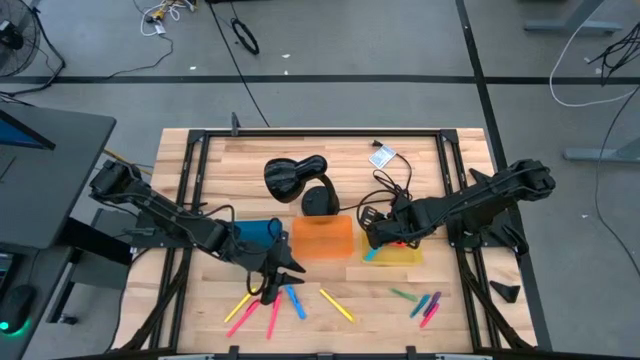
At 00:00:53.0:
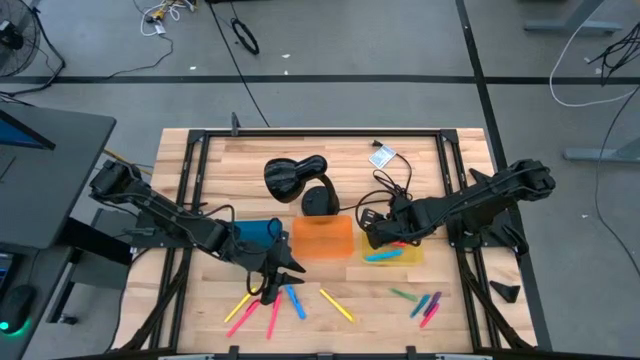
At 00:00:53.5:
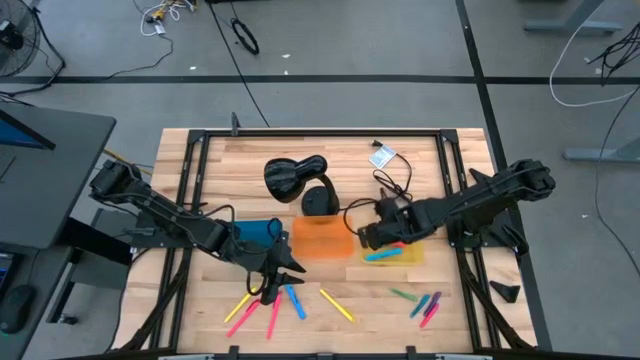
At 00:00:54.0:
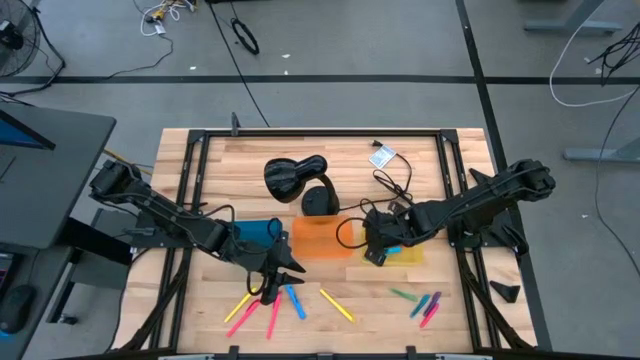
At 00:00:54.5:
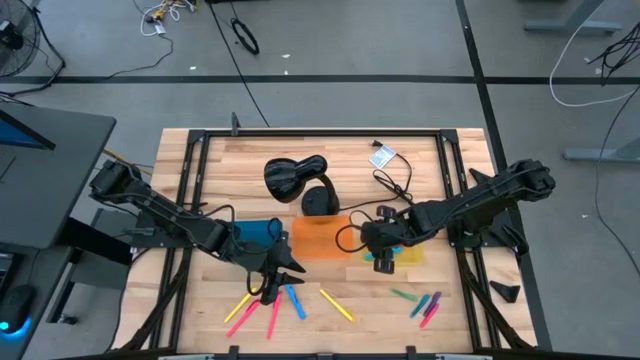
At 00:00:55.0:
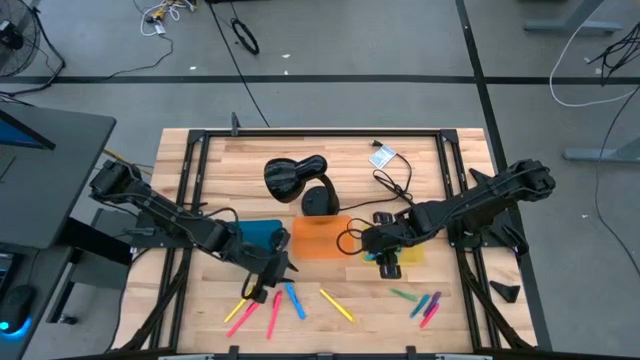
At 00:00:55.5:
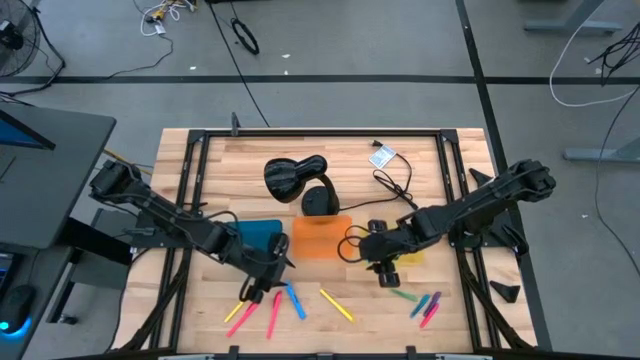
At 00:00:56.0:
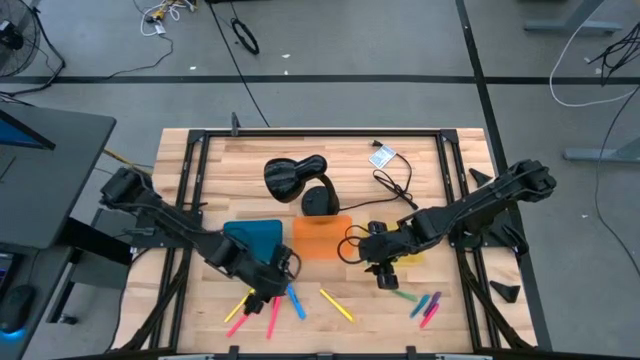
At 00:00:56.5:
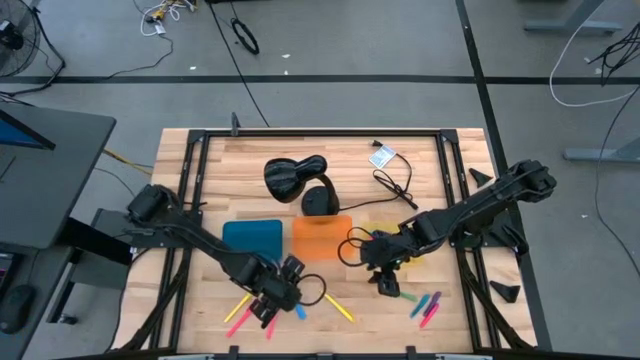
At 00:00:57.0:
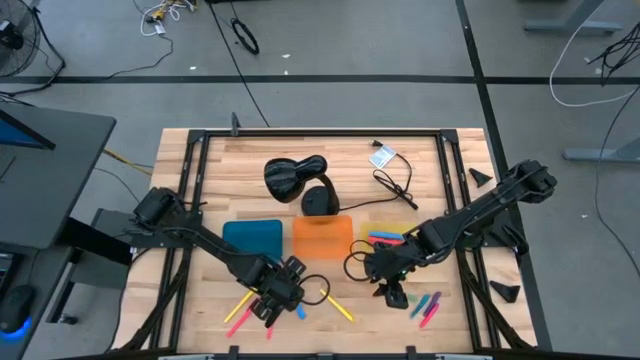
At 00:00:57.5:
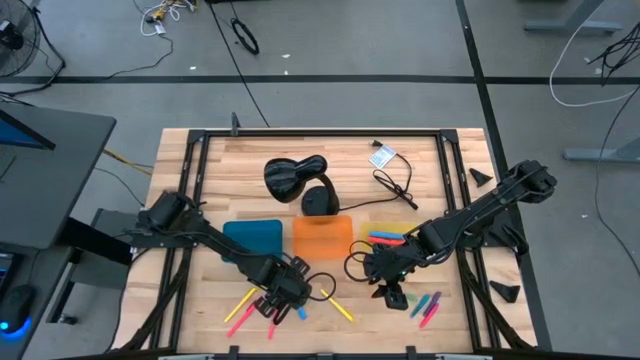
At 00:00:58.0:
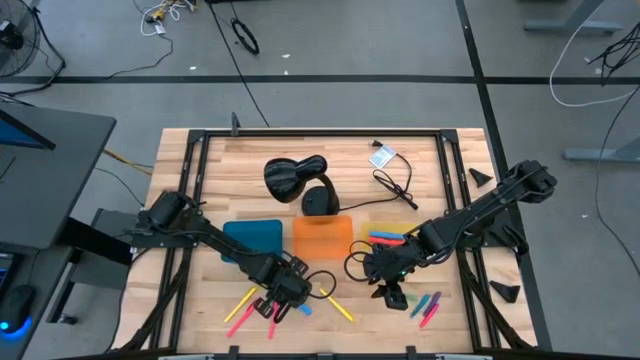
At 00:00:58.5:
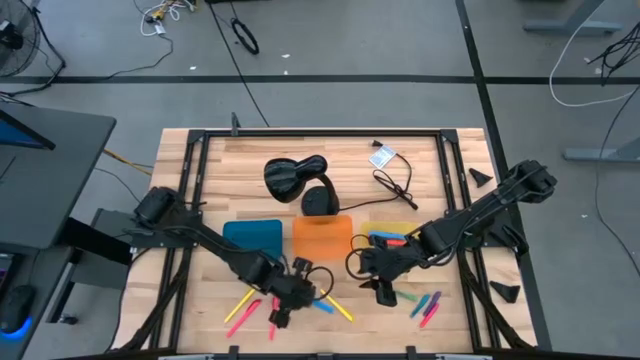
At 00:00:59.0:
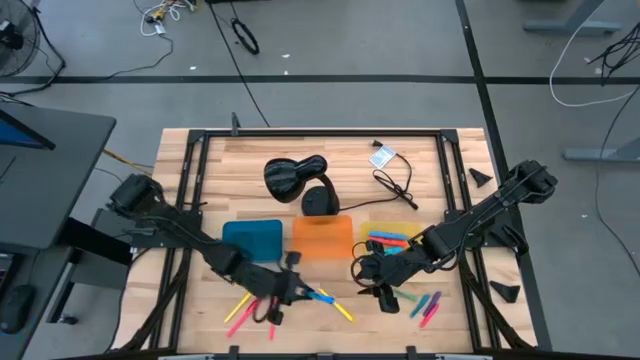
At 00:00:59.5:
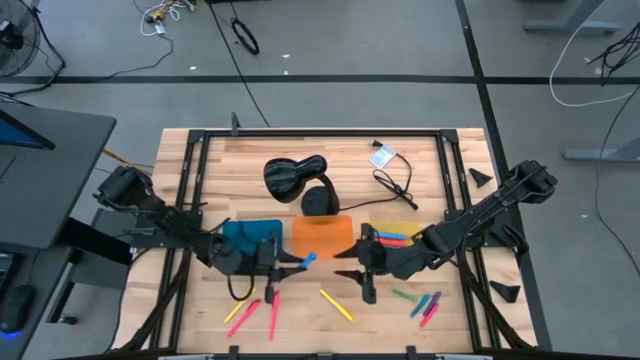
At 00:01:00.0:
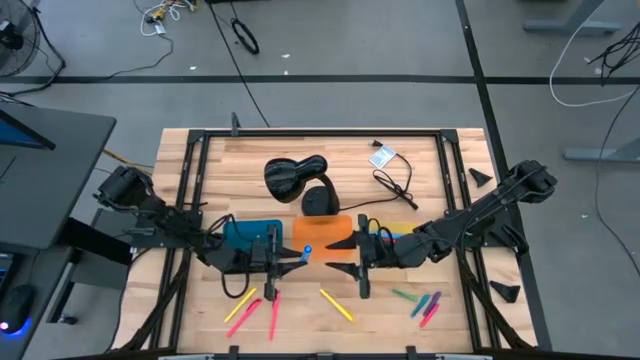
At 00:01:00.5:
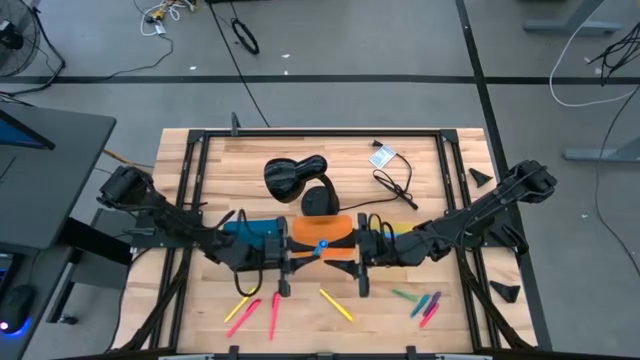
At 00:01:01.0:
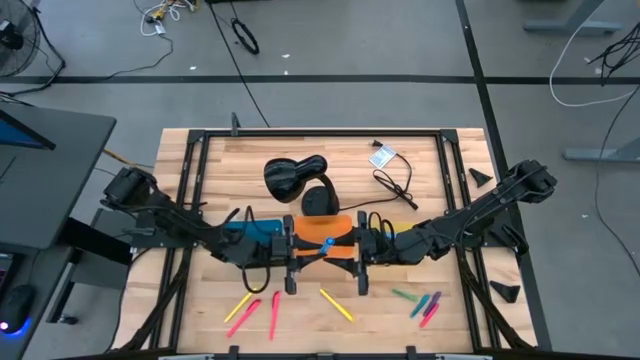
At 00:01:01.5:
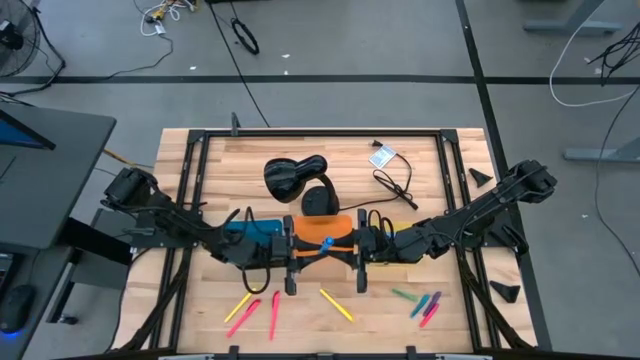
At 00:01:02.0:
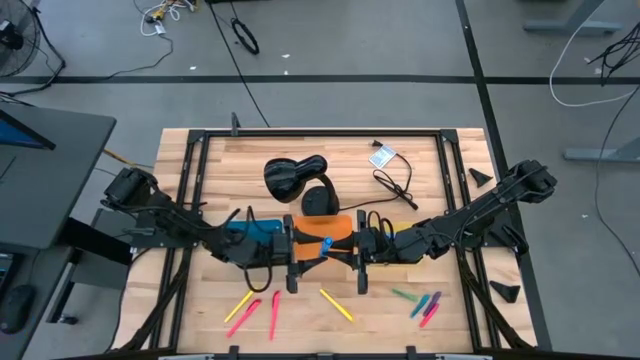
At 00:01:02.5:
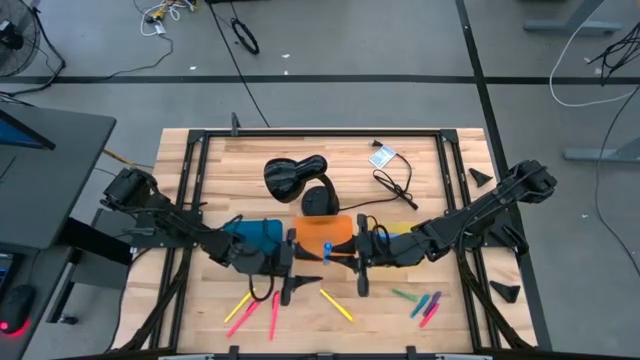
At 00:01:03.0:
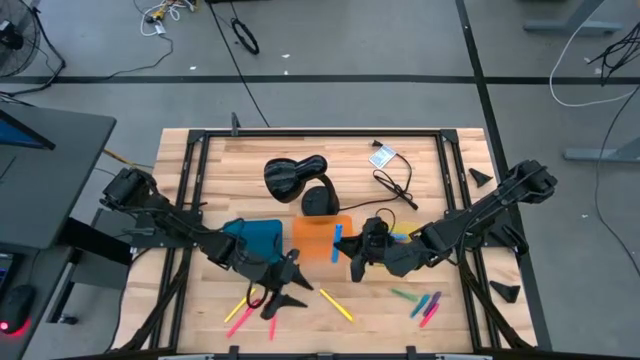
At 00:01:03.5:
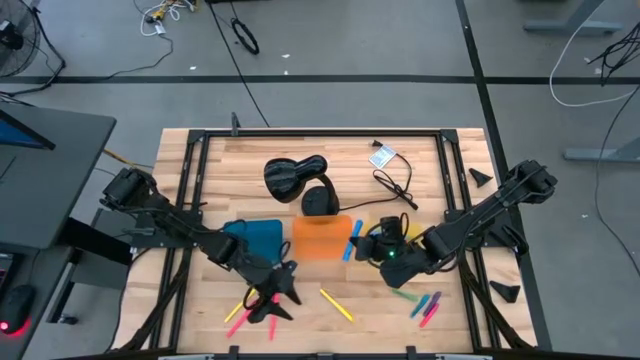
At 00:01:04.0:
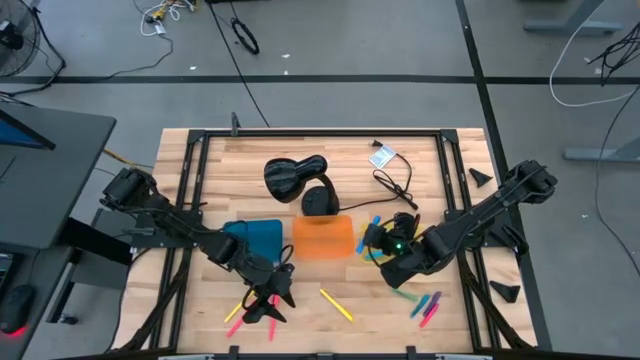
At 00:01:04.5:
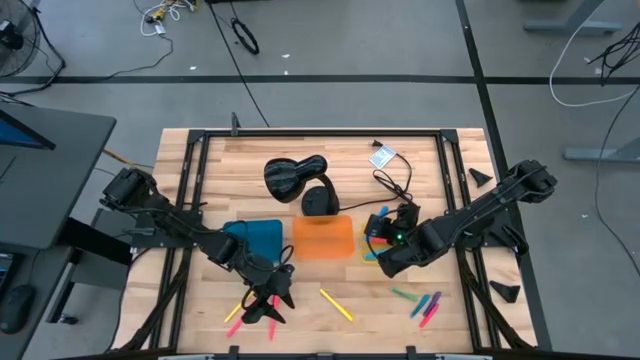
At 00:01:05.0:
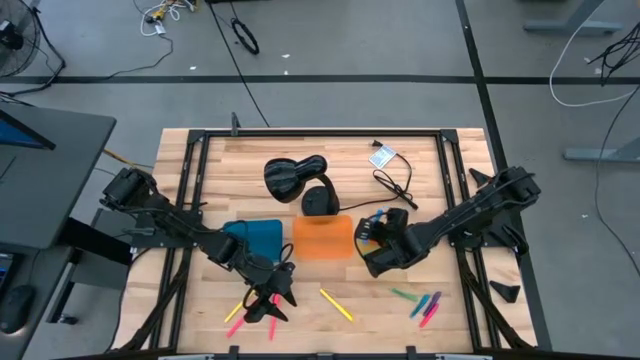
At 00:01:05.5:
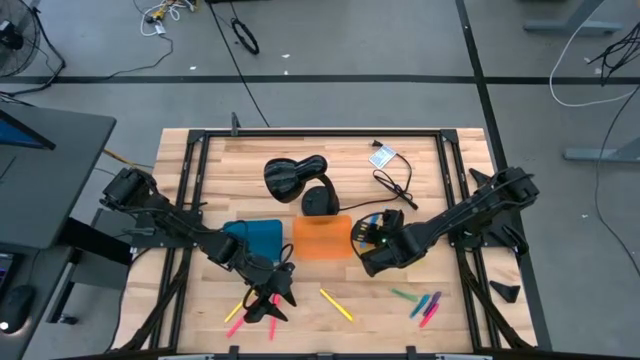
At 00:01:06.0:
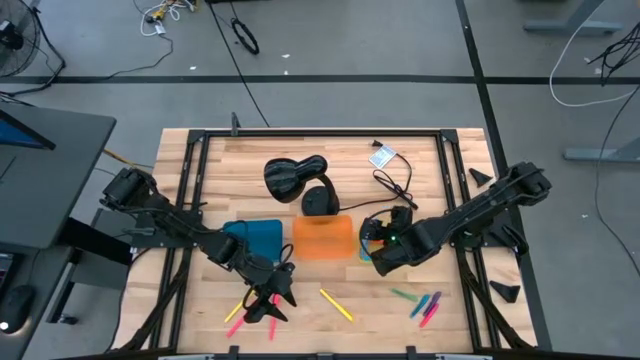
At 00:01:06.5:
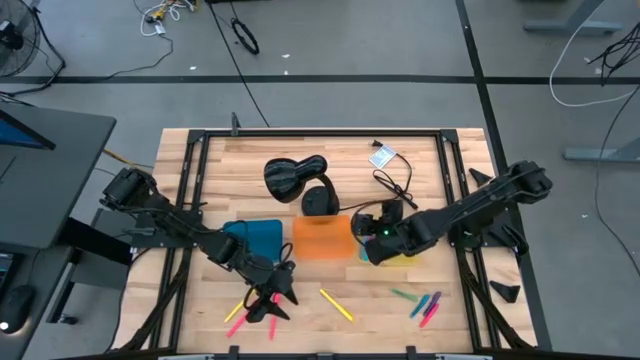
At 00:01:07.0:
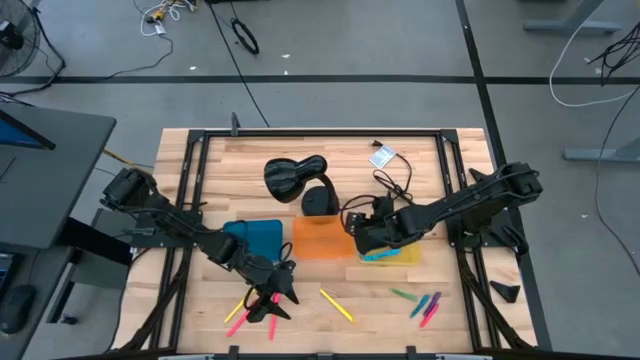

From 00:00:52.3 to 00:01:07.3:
Task: Pick & Place Markers
Put the blue highlighter pen into the yellow bin

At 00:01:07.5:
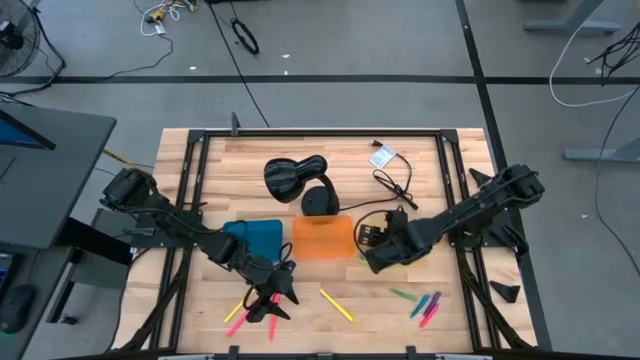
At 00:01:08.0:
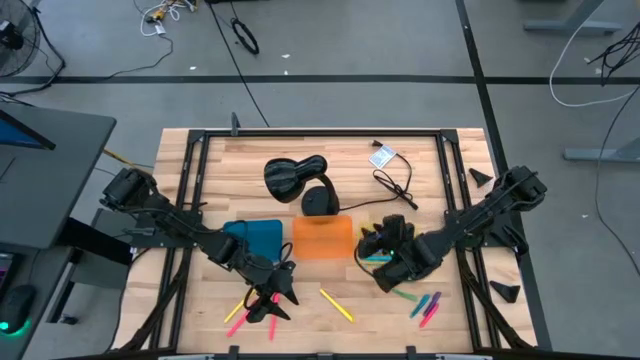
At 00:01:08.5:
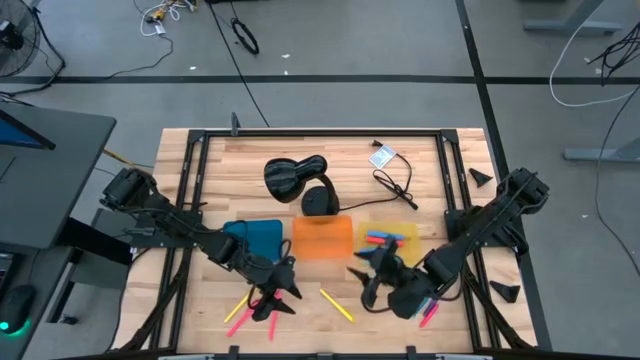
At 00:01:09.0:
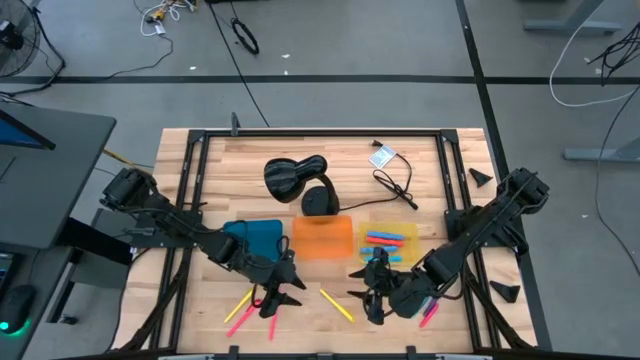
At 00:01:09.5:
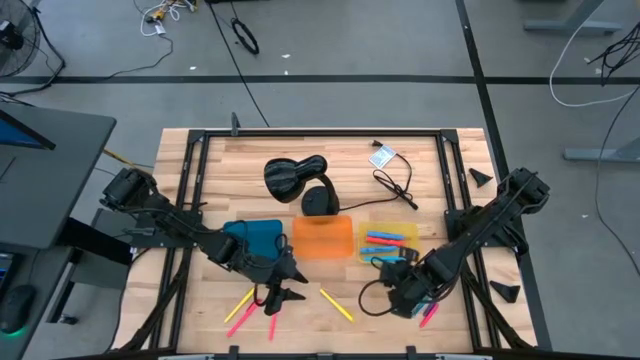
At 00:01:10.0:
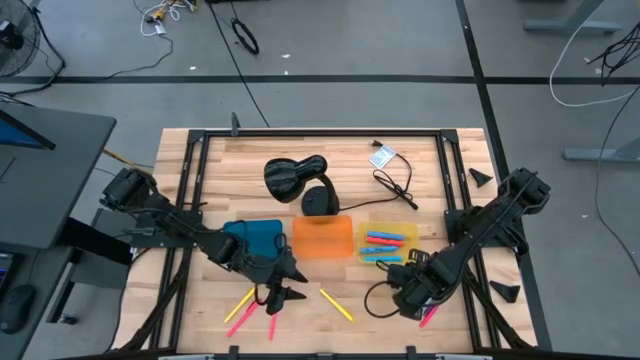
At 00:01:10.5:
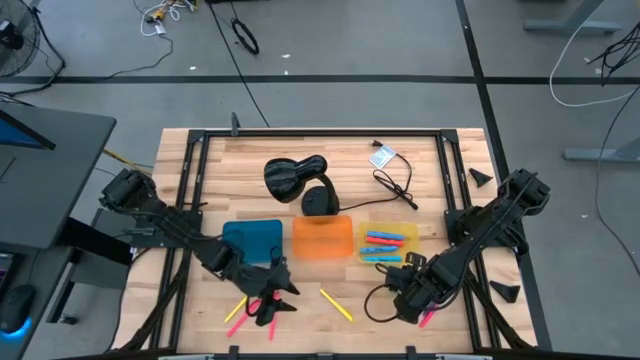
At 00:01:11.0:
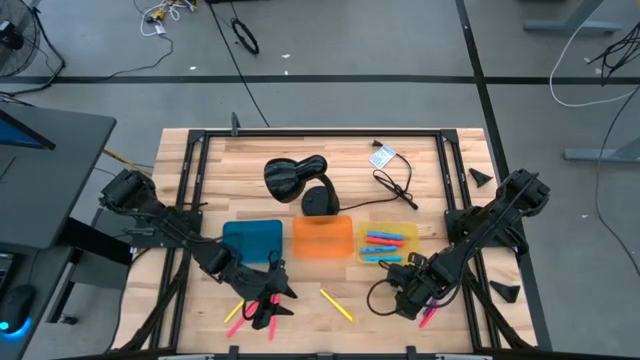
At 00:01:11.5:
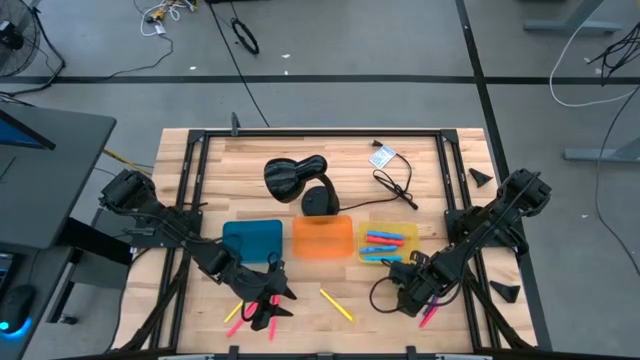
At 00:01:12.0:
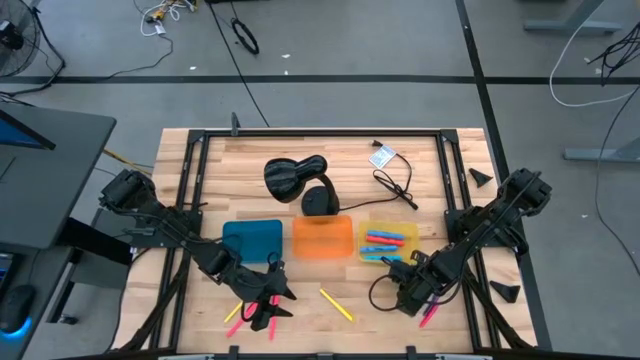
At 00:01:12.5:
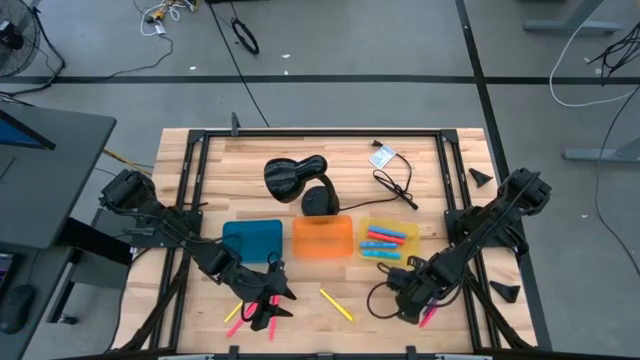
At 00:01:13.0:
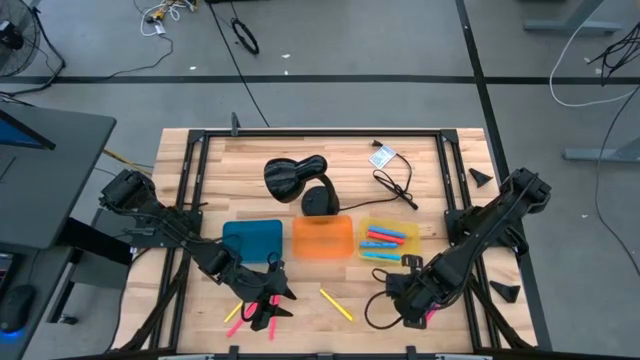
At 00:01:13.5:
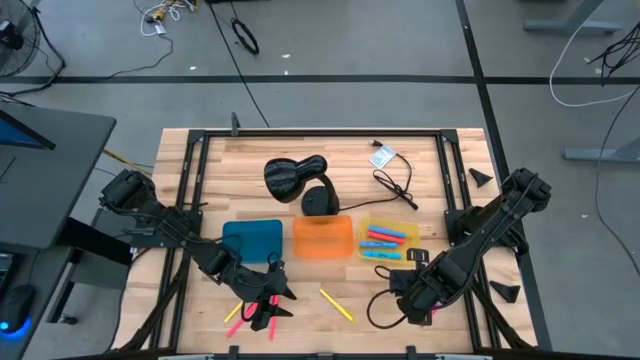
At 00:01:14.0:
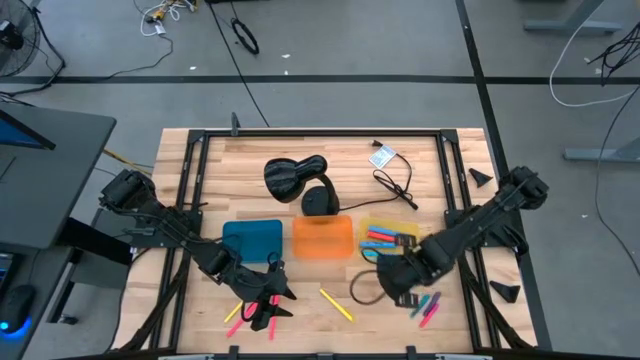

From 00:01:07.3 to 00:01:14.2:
Put the green pen into the orange bin
